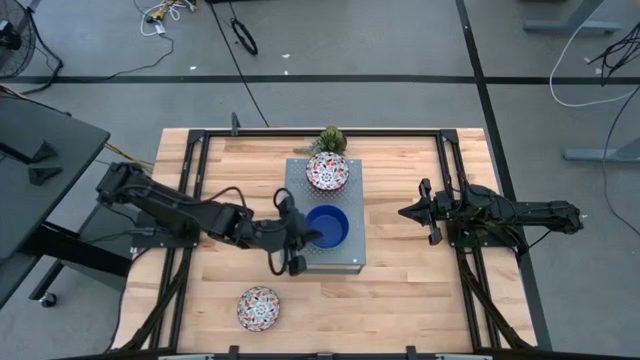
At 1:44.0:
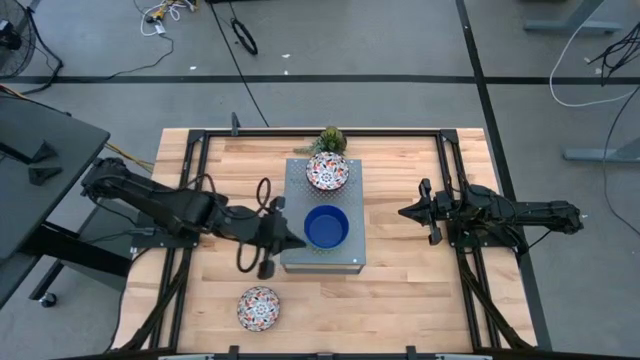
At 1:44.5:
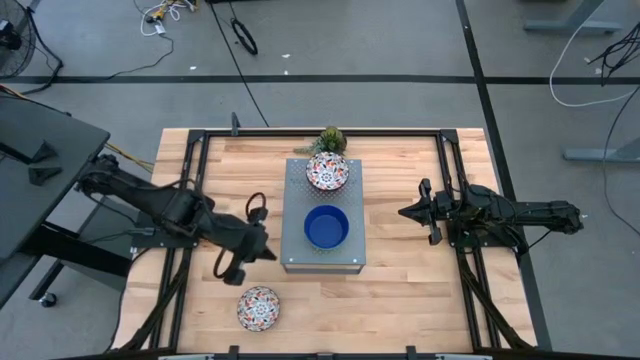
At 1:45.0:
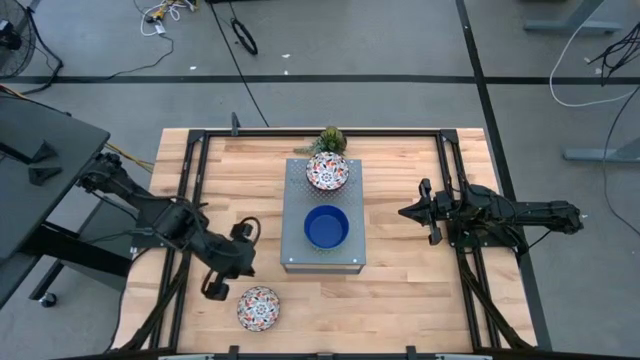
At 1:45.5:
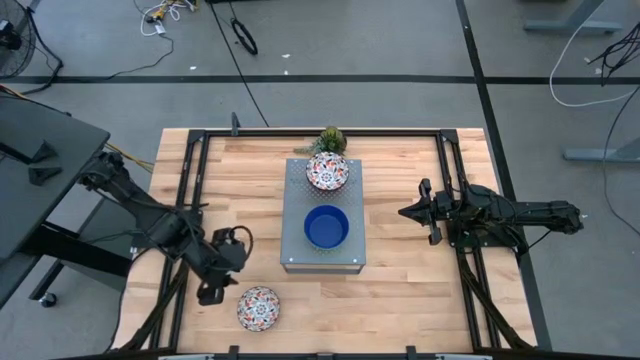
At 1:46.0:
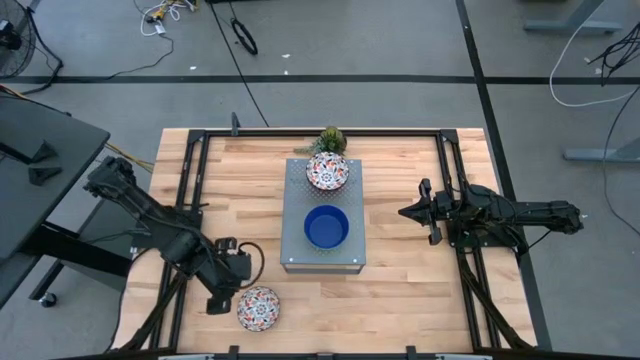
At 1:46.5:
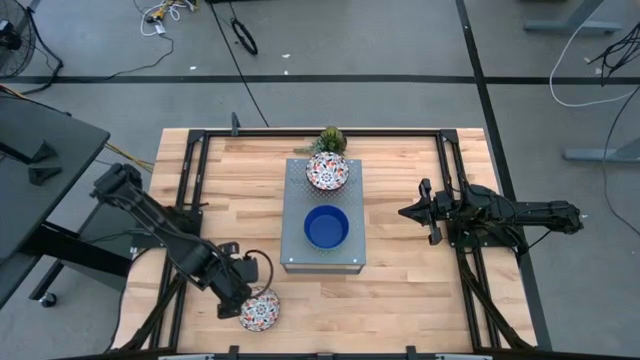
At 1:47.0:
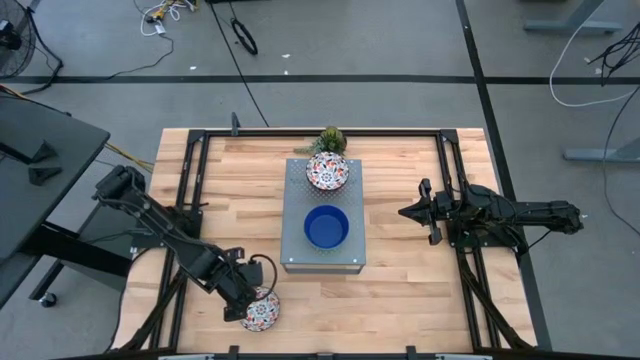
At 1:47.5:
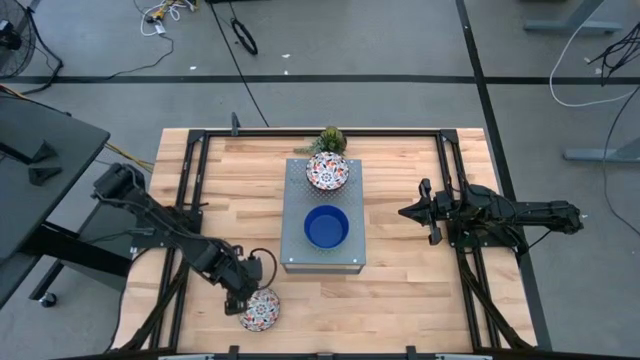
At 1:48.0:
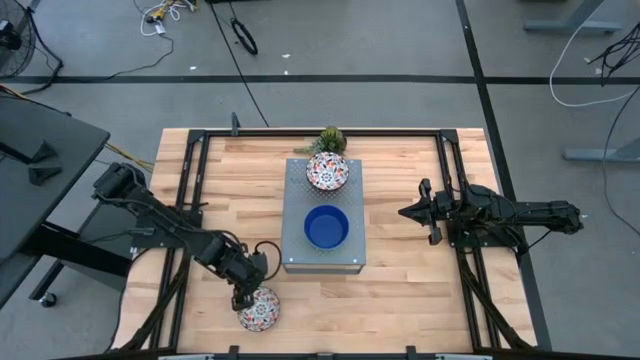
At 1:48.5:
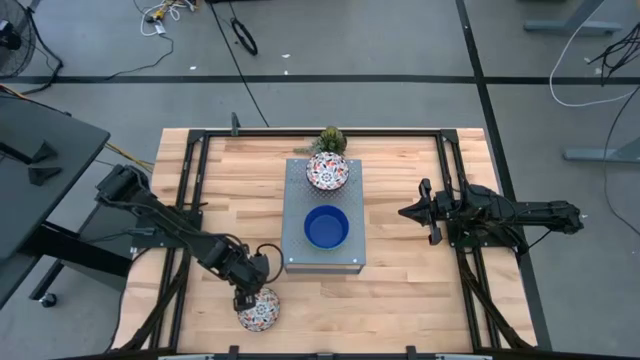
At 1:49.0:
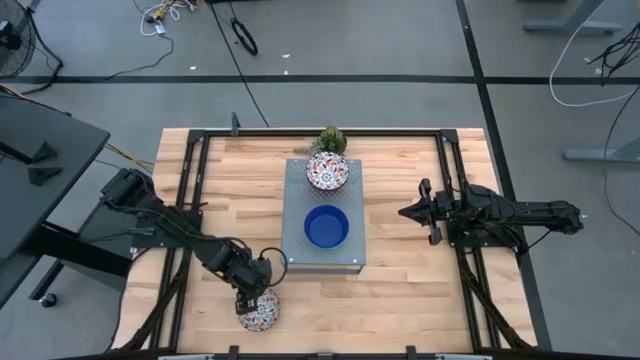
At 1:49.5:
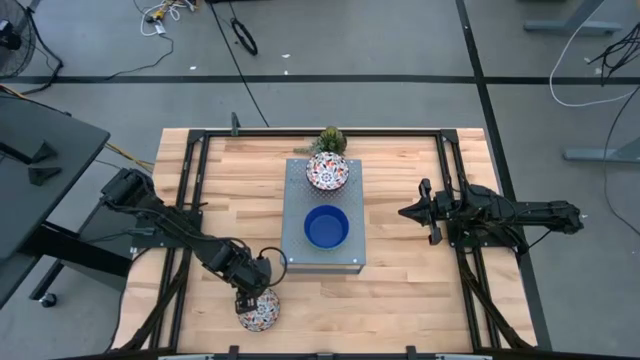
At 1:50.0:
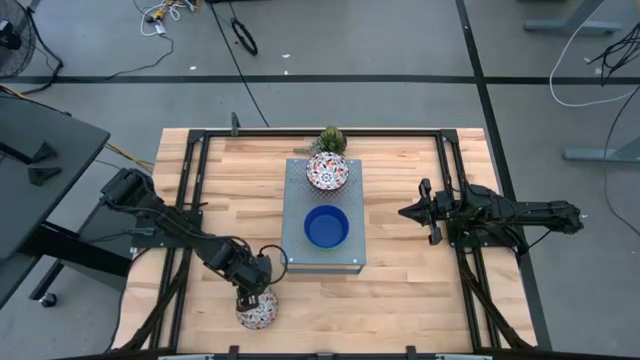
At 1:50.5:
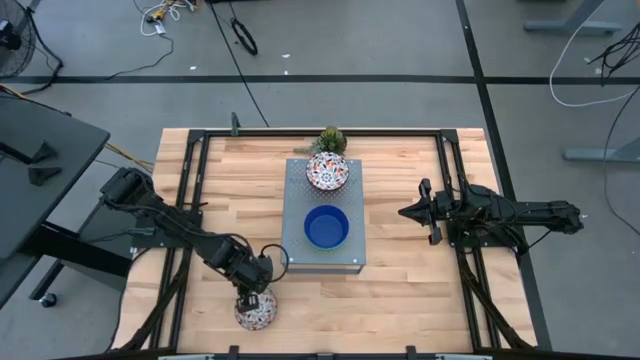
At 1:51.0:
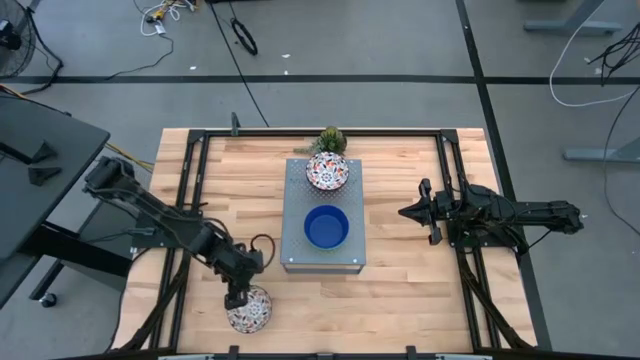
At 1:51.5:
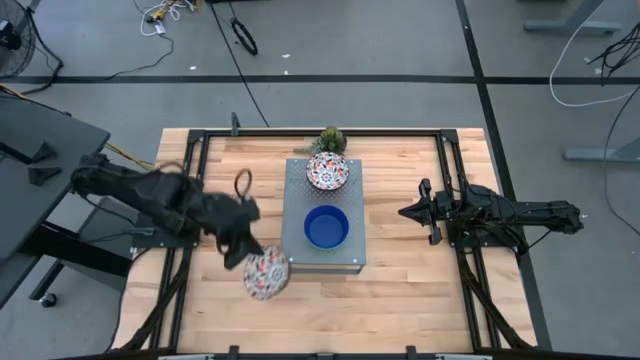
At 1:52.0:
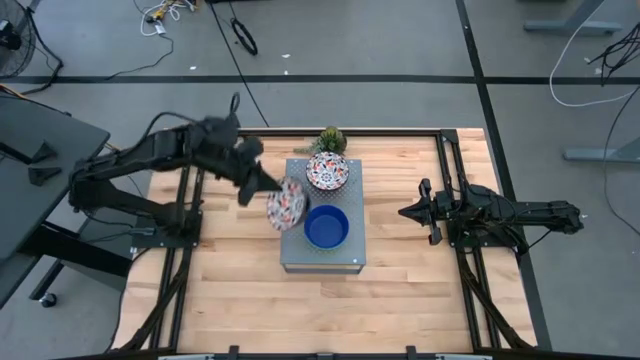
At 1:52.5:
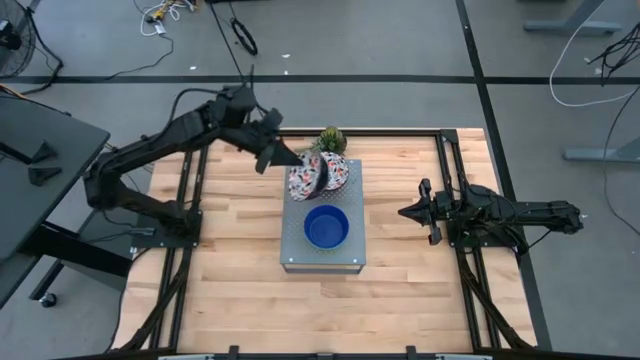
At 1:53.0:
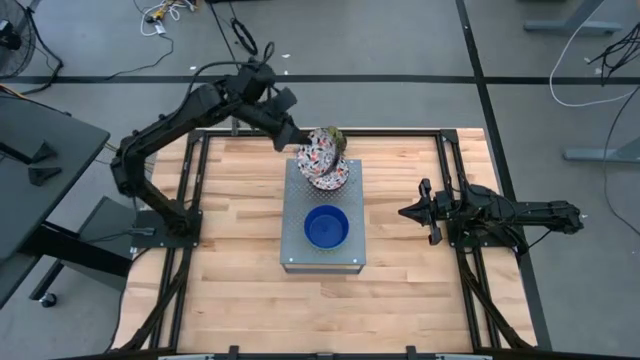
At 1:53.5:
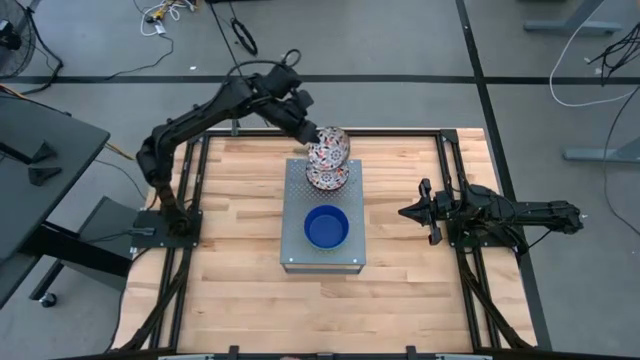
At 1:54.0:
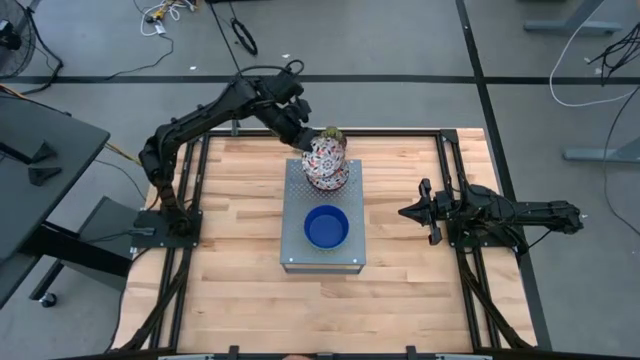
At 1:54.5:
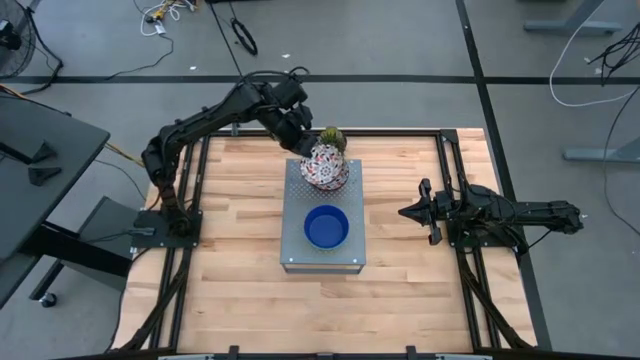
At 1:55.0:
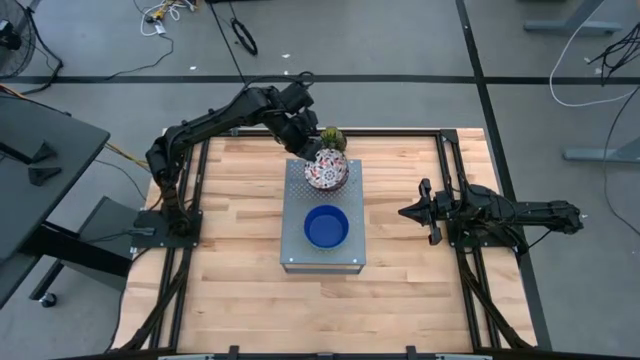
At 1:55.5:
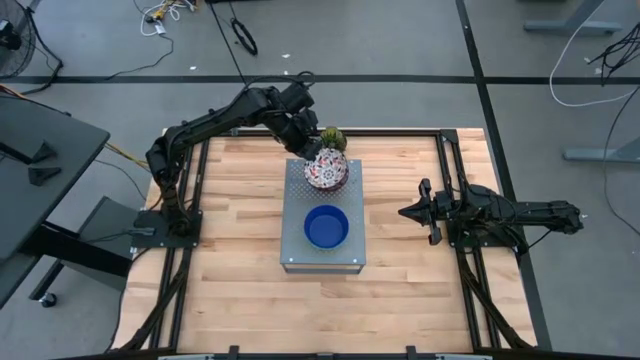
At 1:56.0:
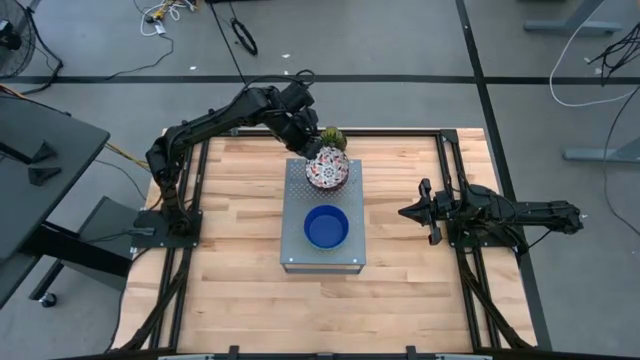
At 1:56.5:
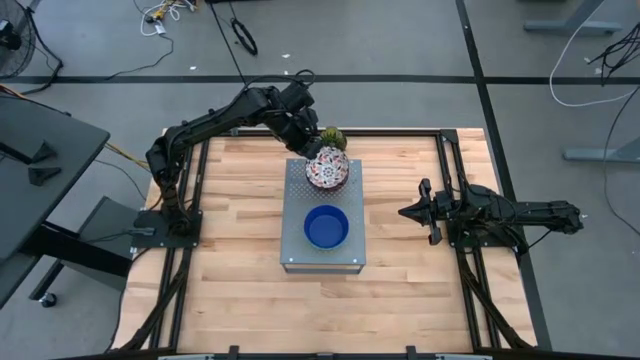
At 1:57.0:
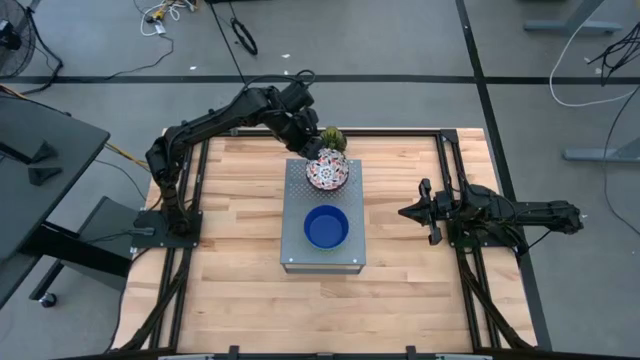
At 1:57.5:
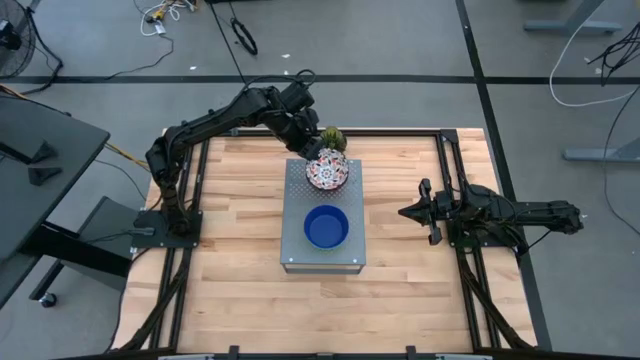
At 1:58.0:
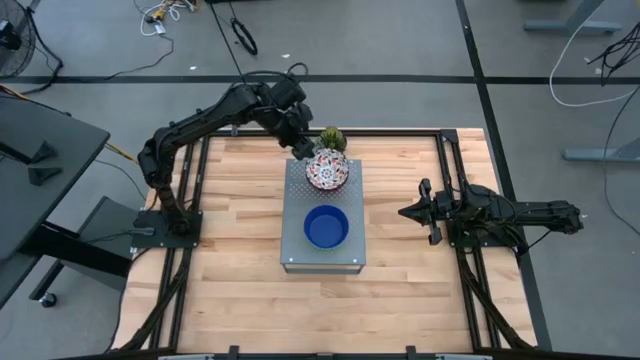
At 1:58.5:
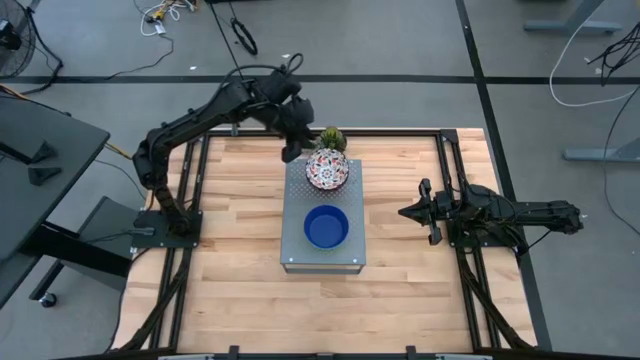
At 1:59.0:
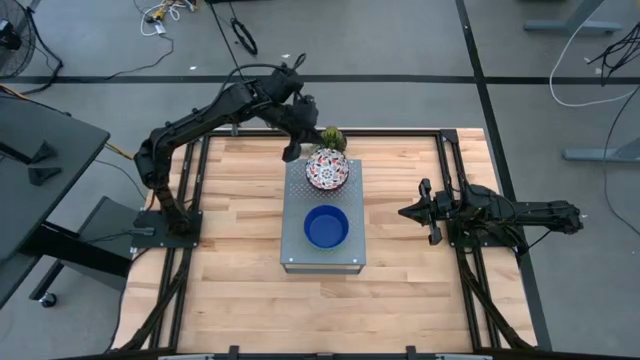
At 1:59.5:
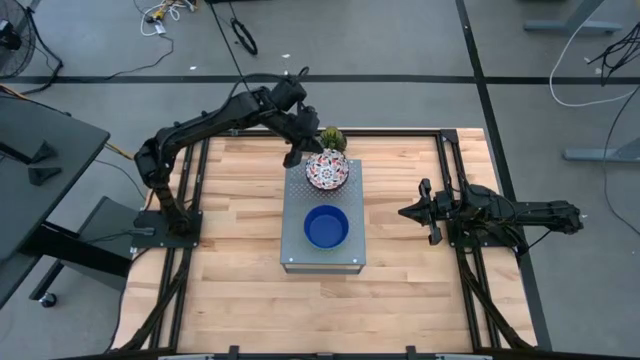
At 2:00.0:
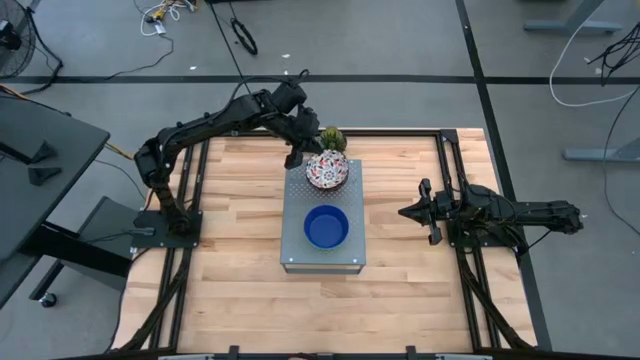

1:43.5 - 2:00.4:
Task: Pick & Place Mini bowls
Stack the white patterned bowl on the other white patterned bowls on the shelf

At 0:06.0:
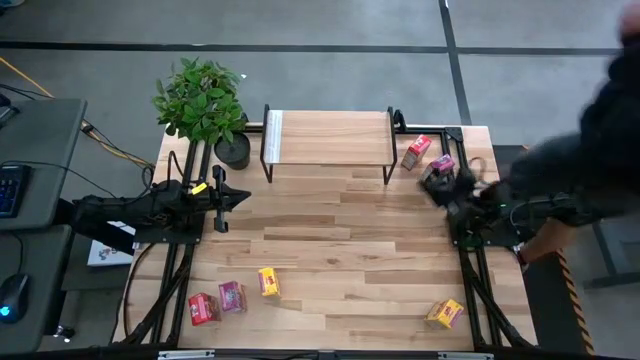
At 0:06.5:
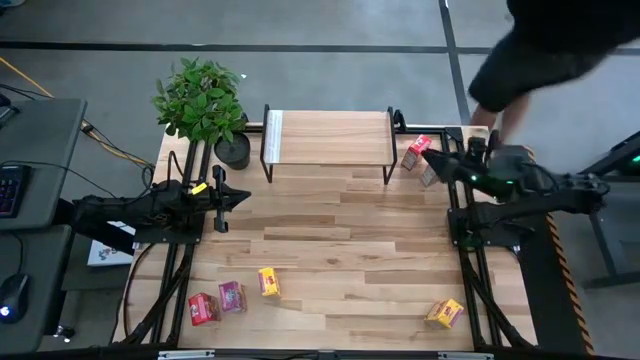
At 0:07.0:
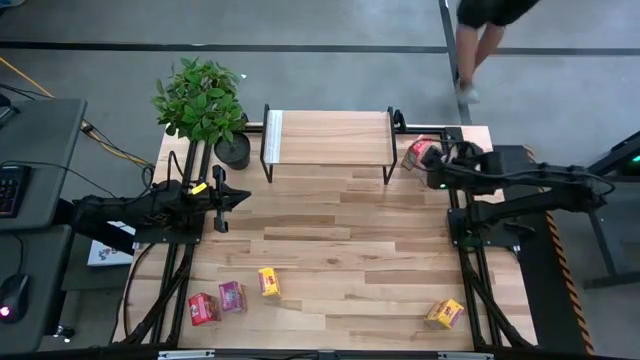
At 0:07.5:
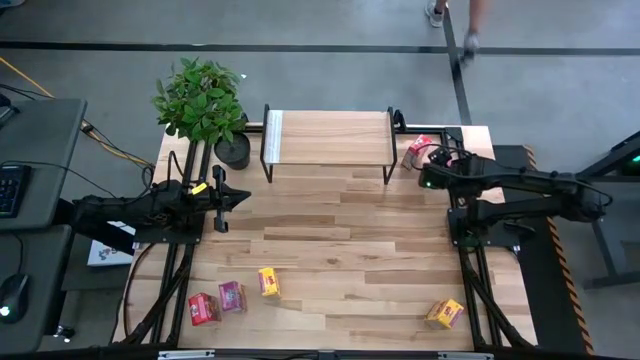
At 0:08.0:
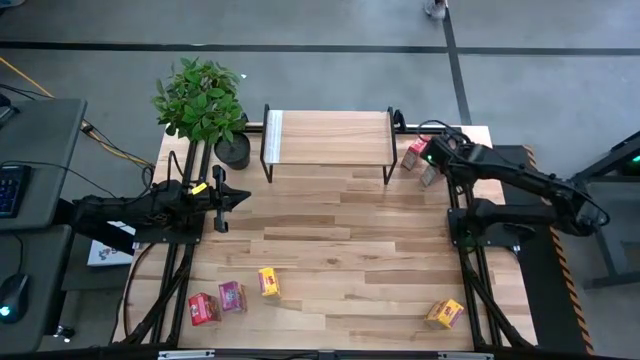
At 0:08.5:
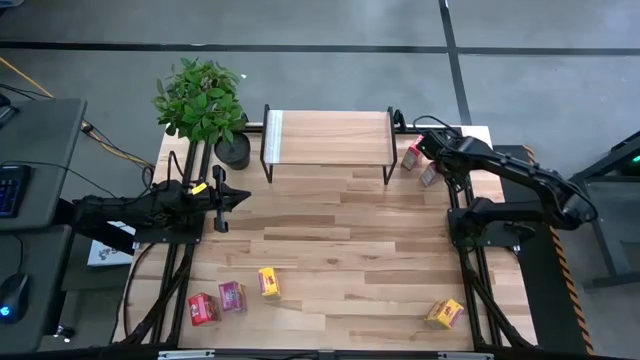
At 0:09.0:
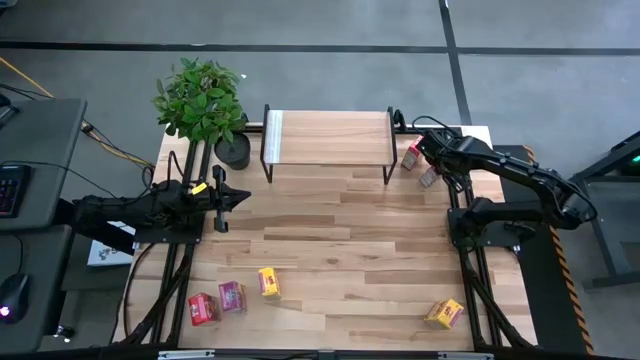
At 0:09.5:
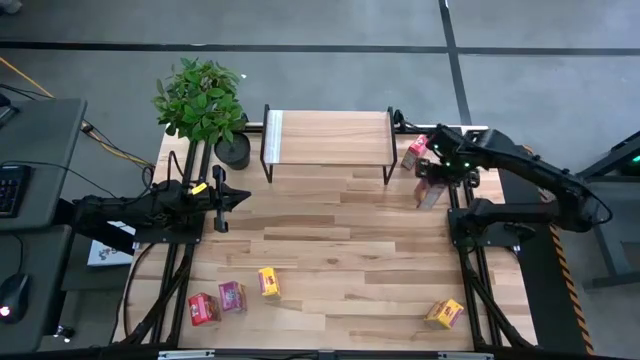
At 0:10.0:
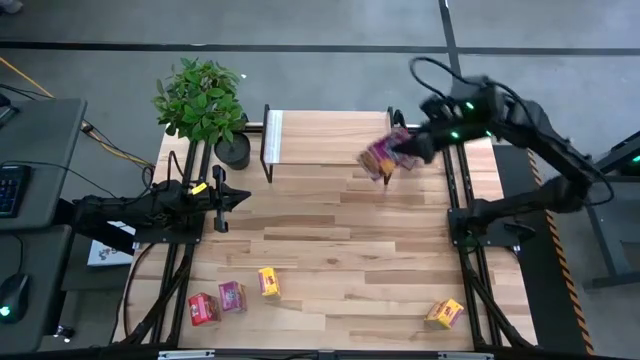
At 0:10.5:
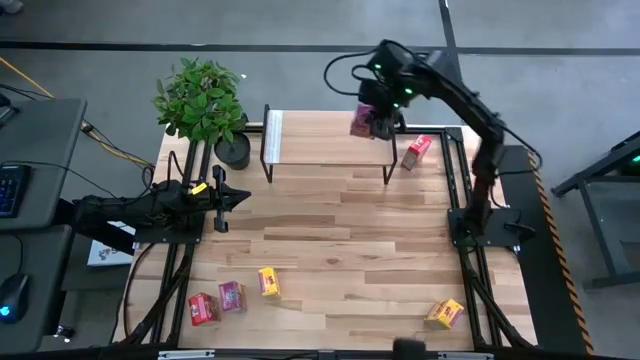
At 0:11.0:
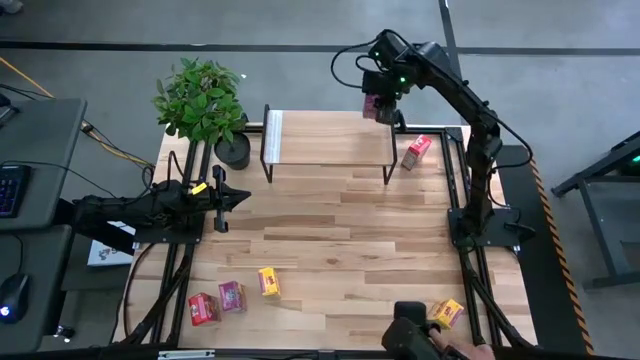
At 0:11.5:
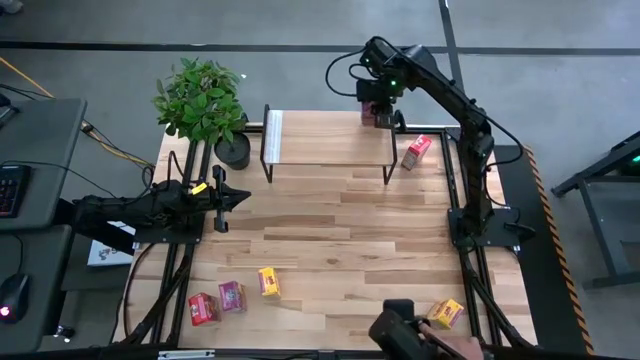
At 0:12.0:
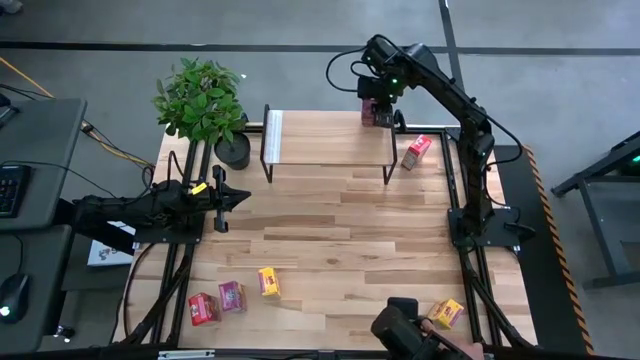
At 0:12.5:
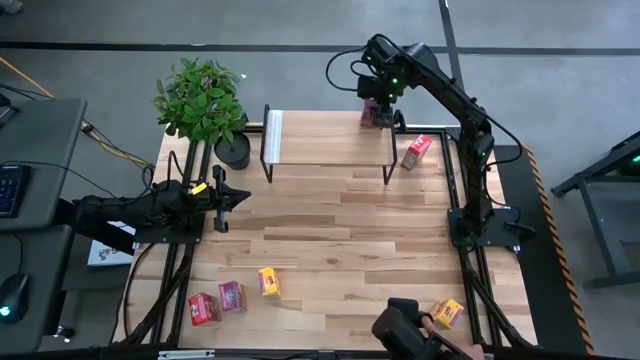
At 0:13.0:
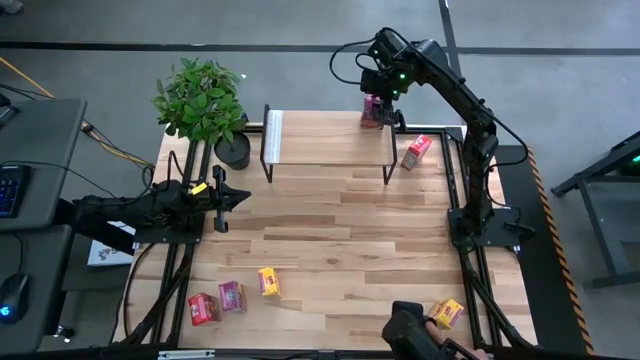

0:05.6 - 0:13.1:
Task: Stack cereal on shelf
Put the top purple cereal box on the shelf
